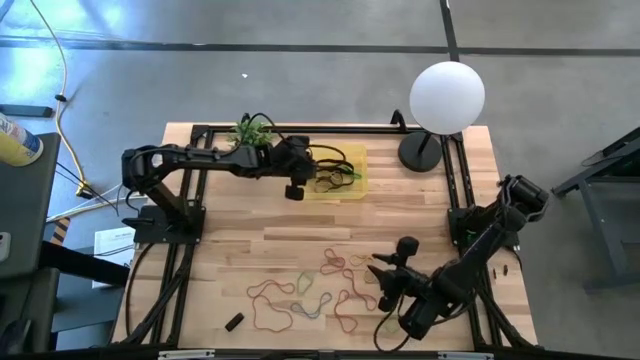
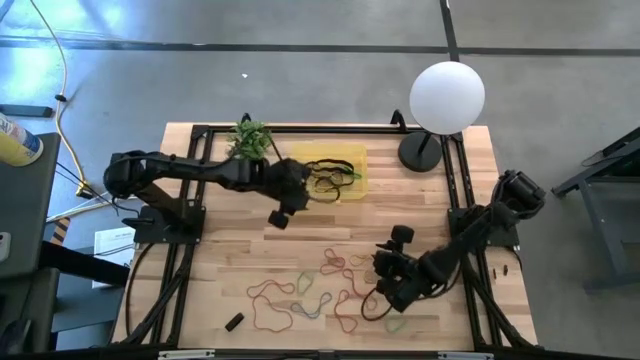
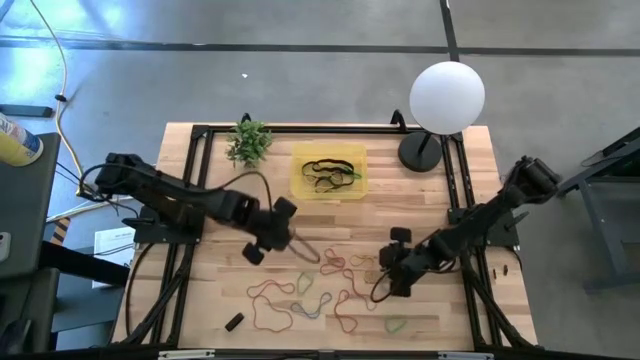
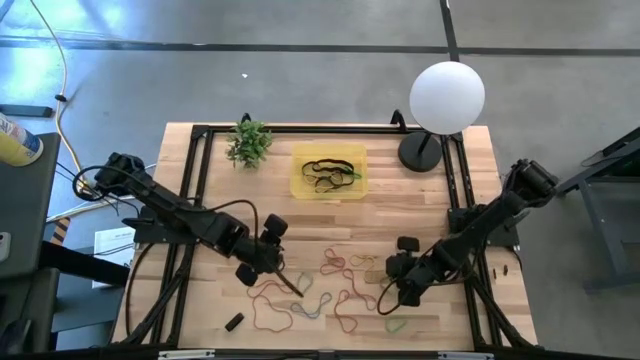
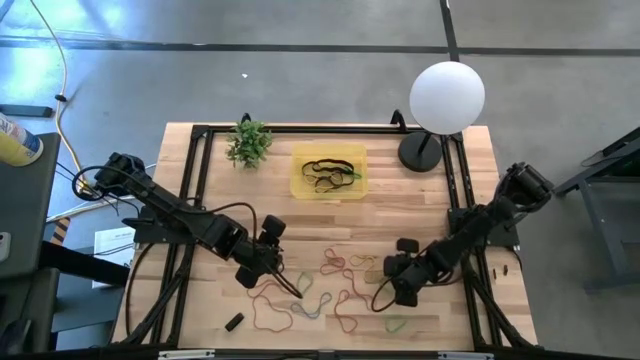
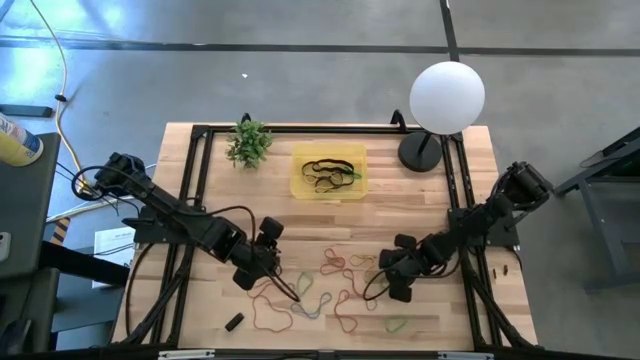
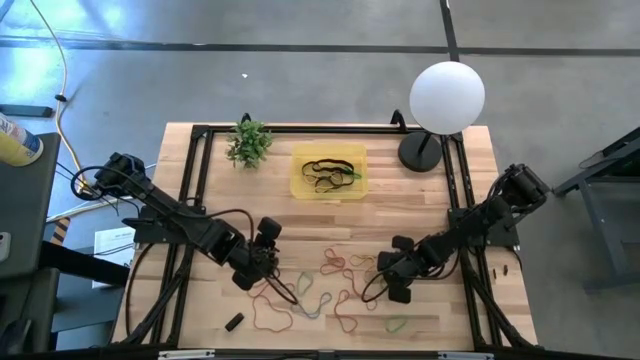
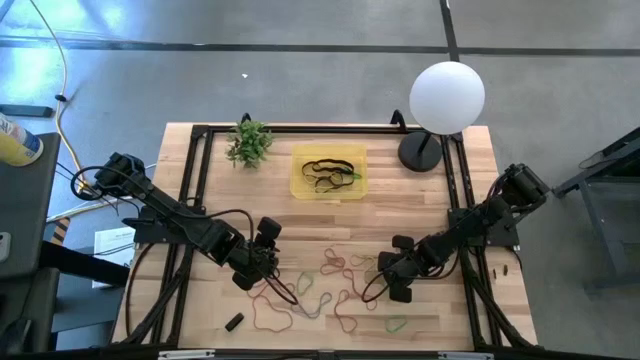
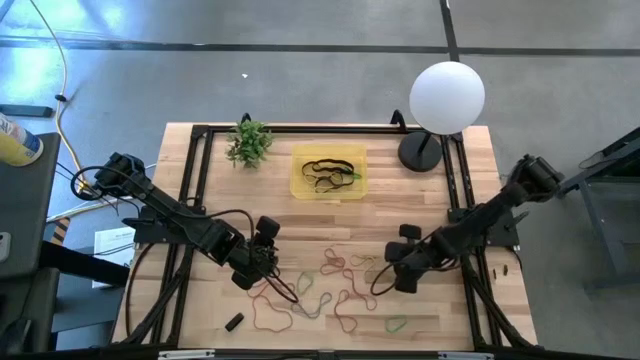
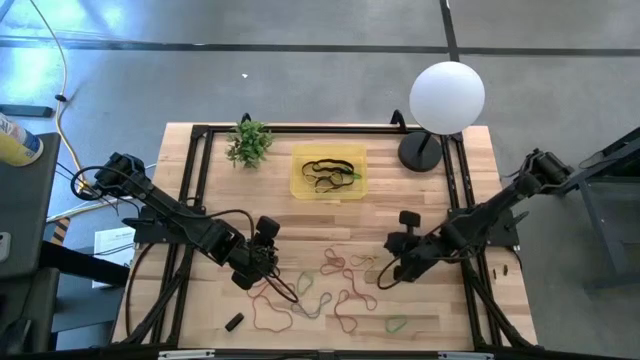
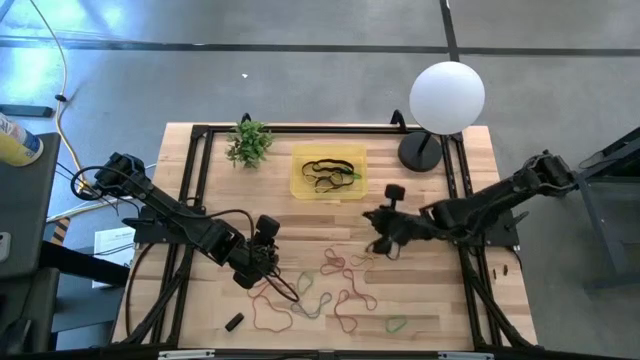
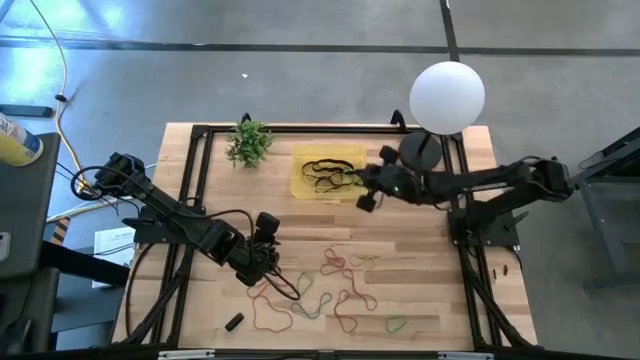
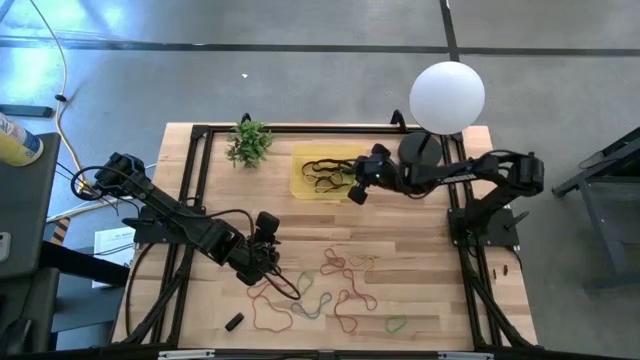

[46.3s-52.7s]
Task: Pick and place rubber bands into bin
Put the top right green rubber band into the yellow bin

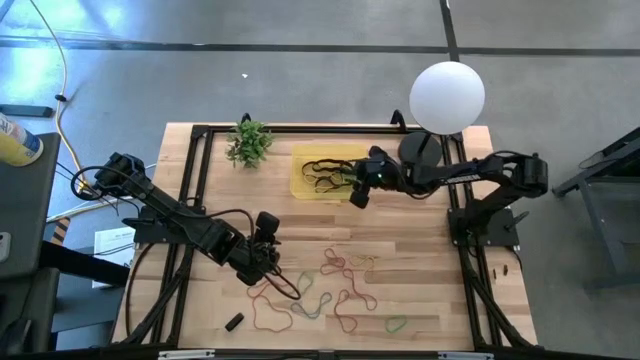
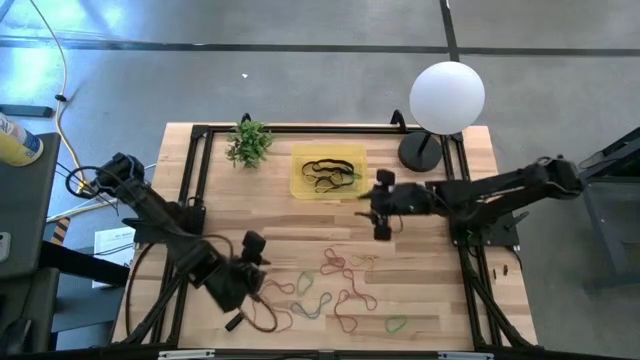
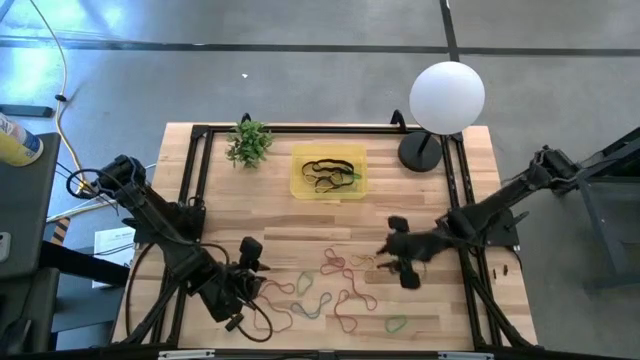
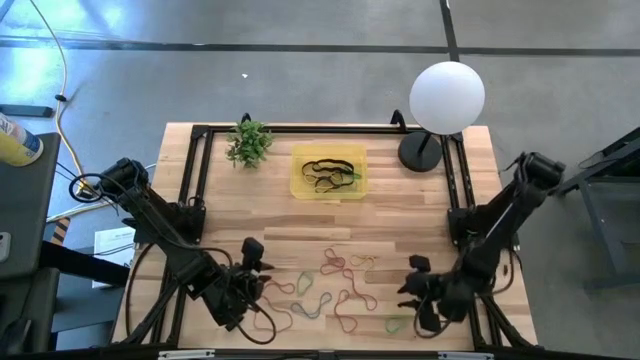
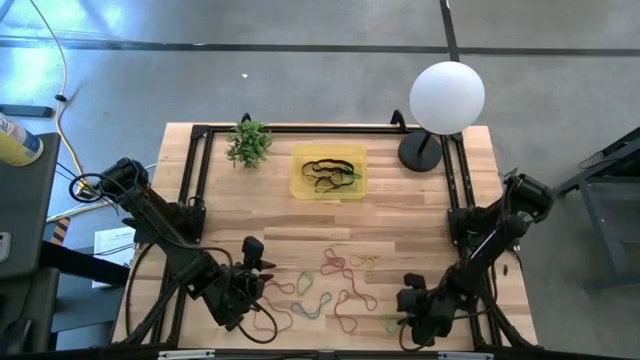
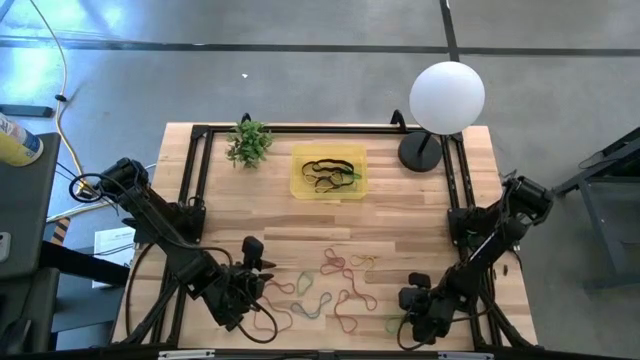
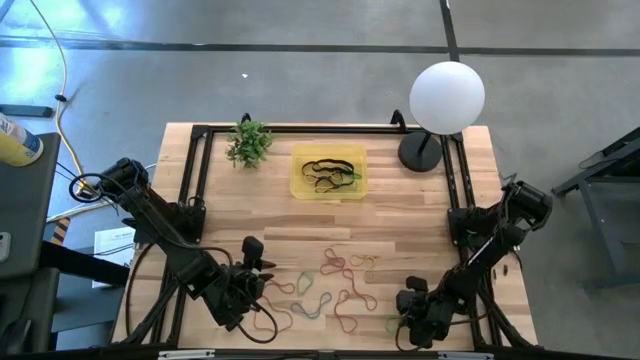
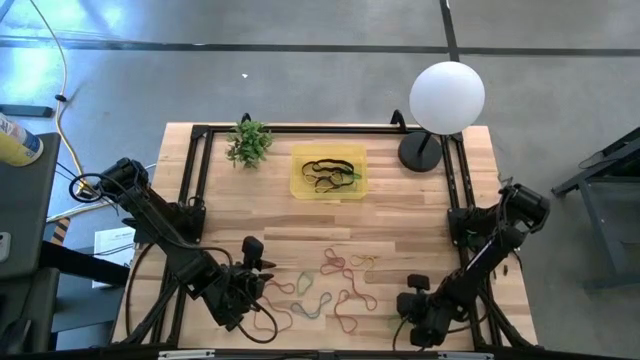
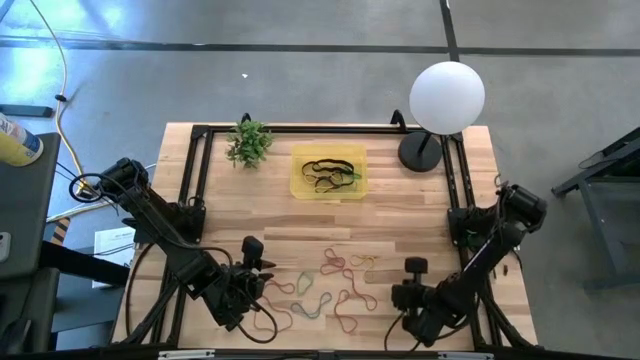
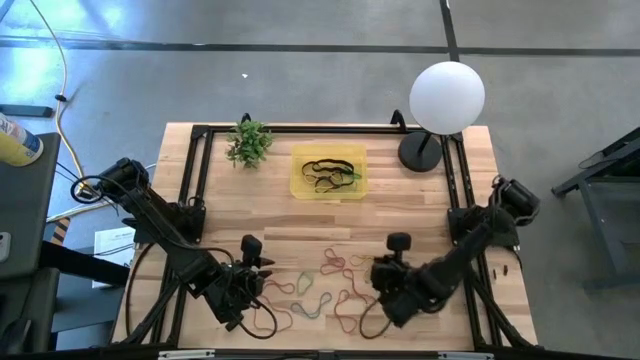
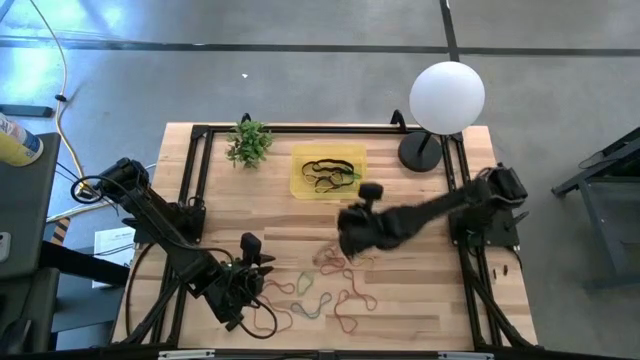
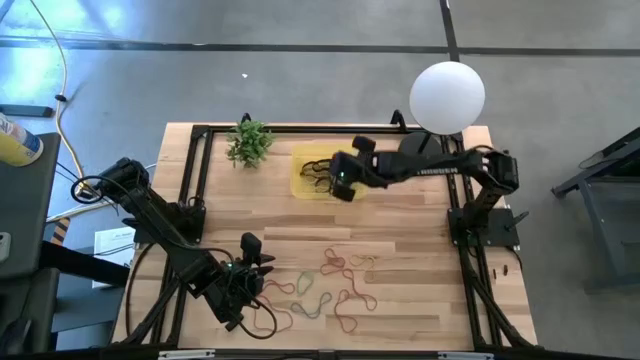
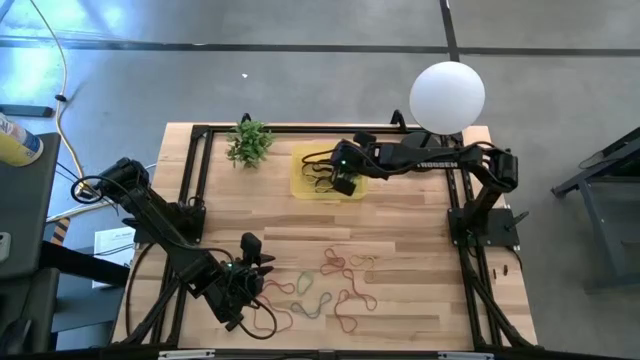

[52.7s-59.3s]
Put the bottom green rubber band into the yellow bin

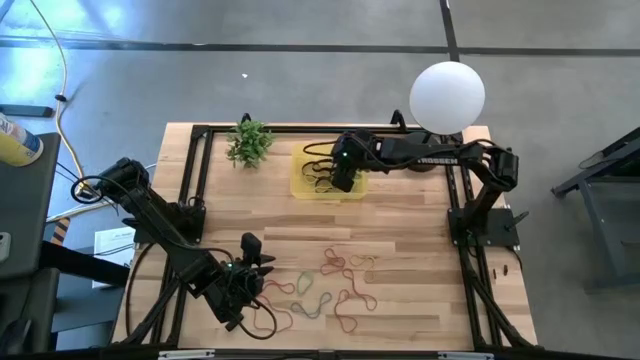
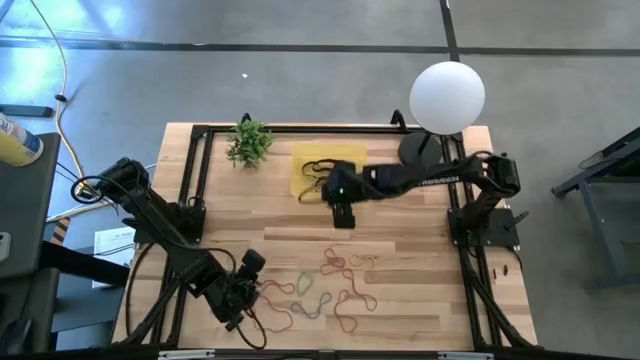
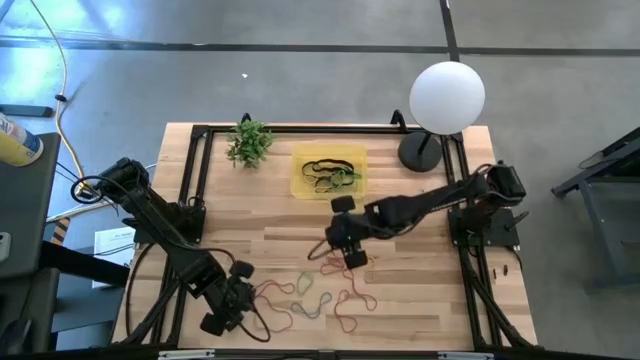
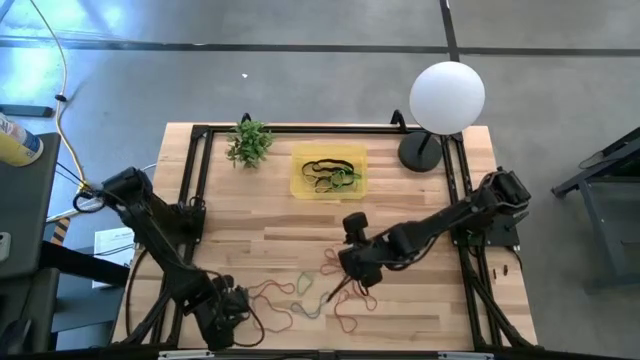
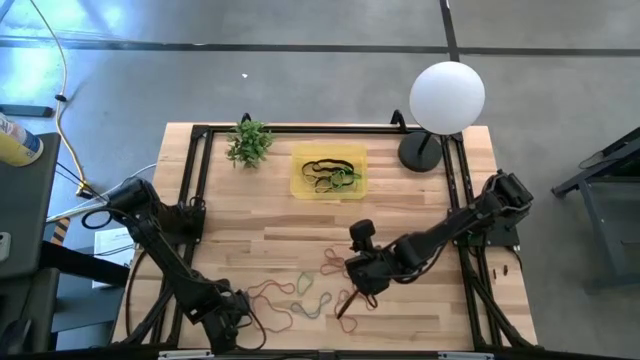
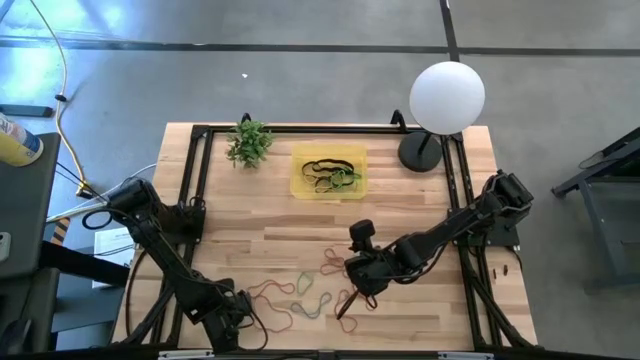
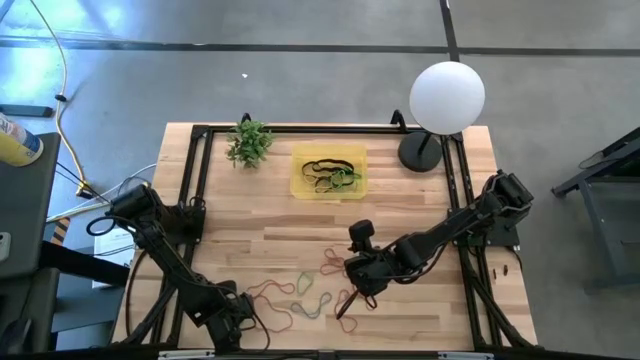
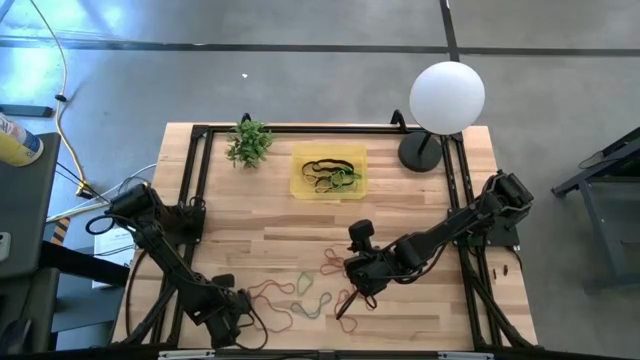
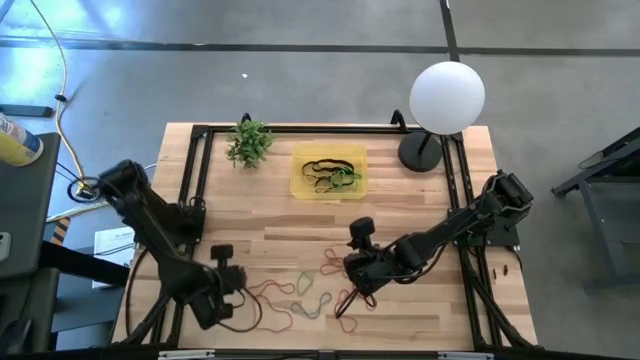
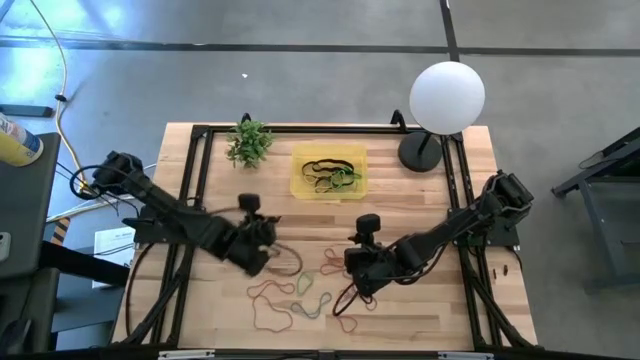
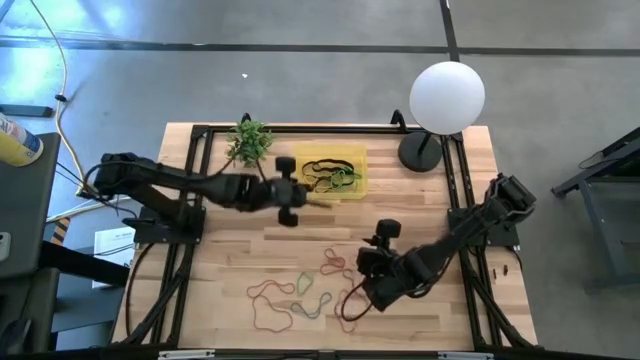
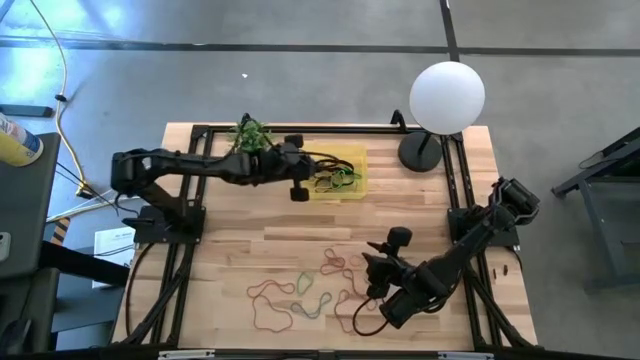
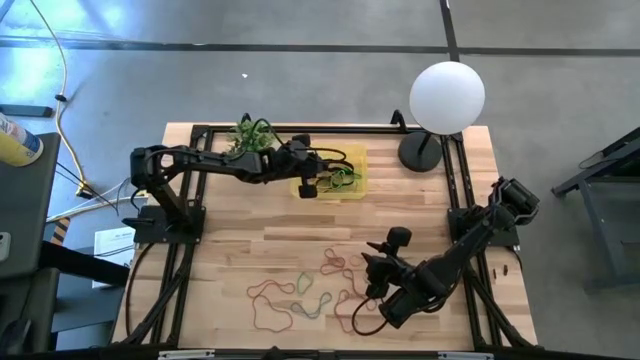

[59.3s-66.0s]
Put the black rubber band into the yellow bin
